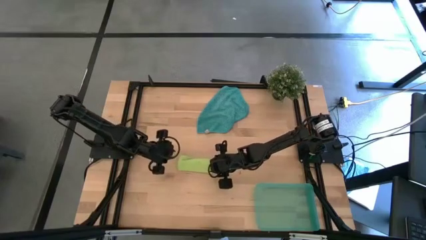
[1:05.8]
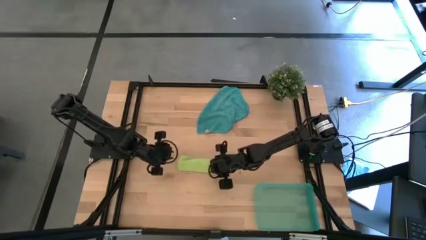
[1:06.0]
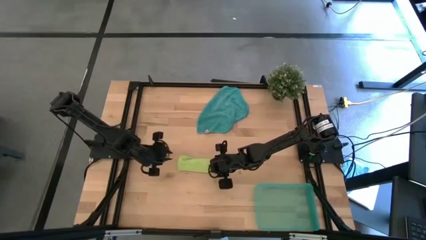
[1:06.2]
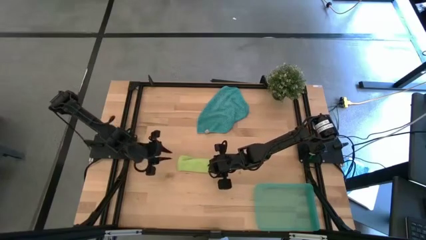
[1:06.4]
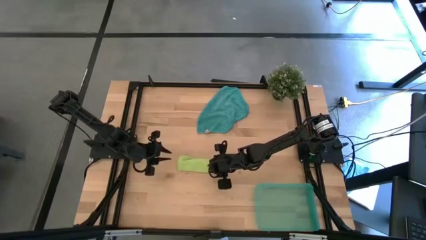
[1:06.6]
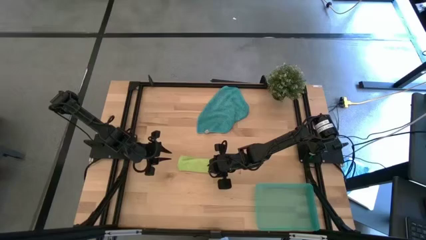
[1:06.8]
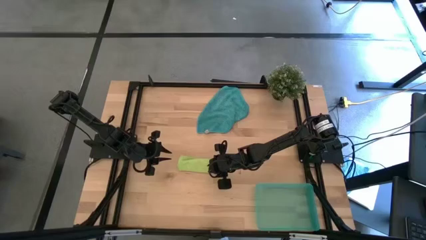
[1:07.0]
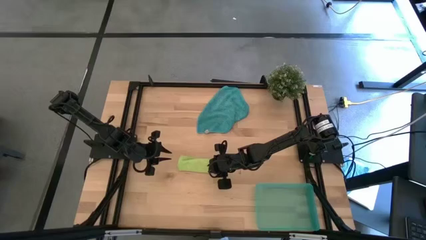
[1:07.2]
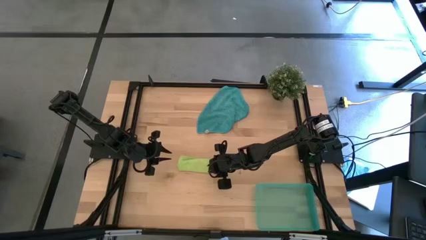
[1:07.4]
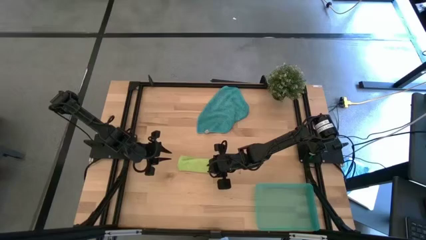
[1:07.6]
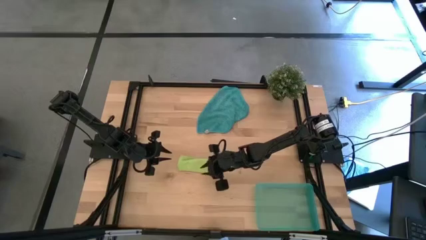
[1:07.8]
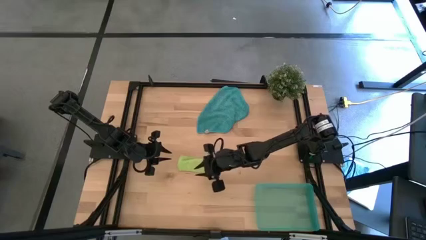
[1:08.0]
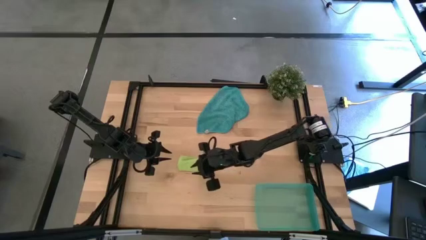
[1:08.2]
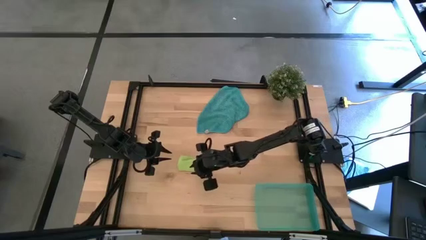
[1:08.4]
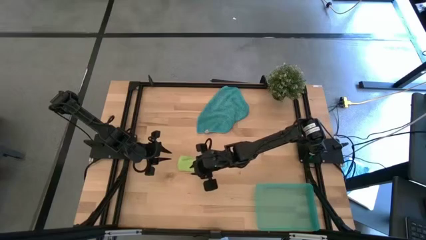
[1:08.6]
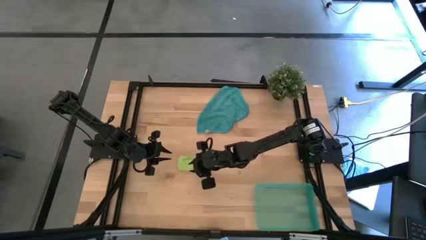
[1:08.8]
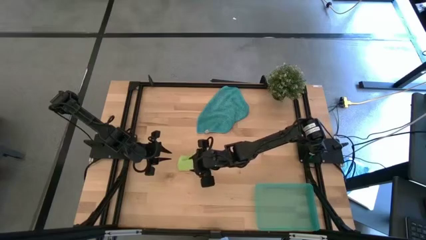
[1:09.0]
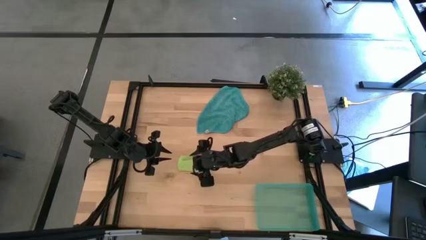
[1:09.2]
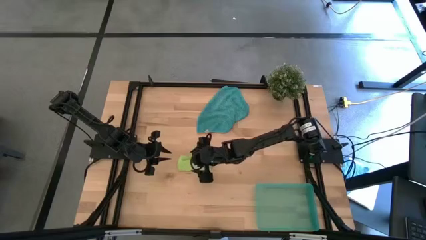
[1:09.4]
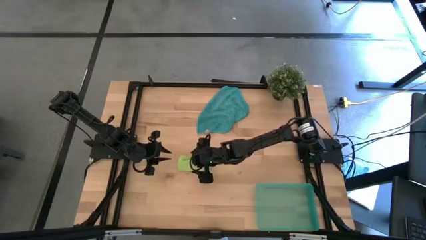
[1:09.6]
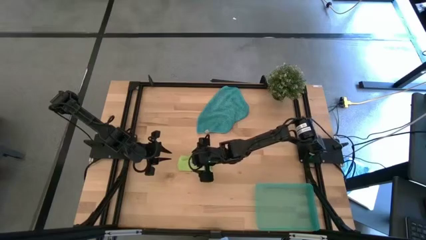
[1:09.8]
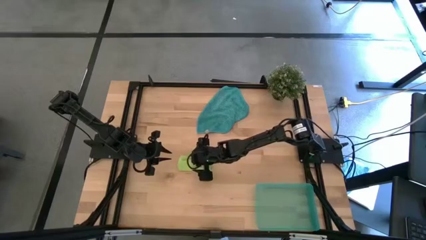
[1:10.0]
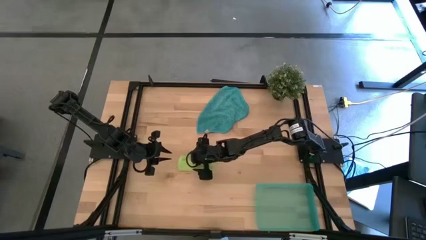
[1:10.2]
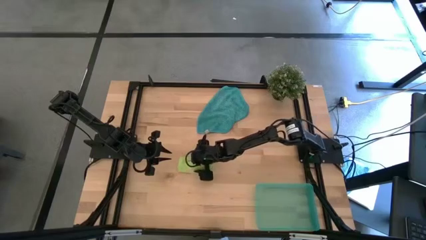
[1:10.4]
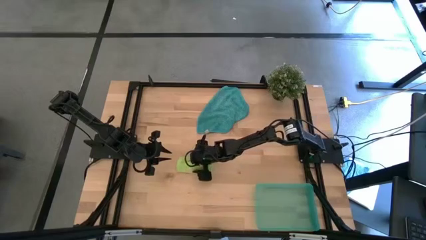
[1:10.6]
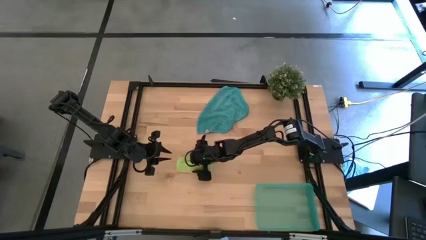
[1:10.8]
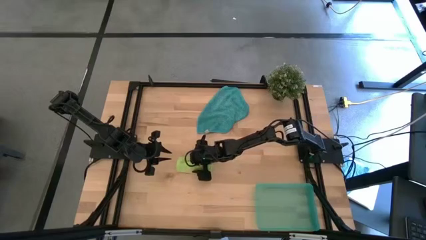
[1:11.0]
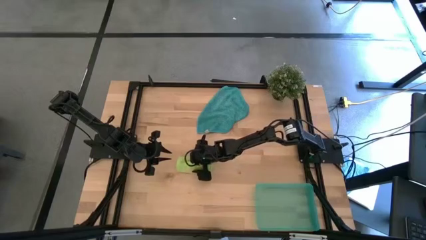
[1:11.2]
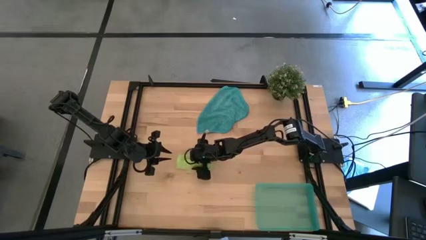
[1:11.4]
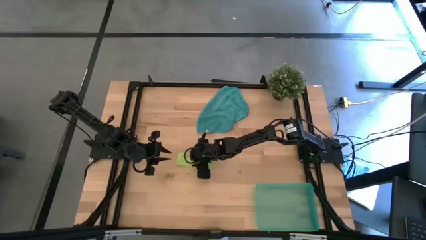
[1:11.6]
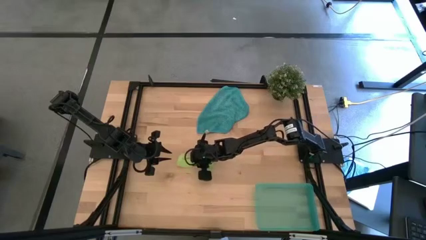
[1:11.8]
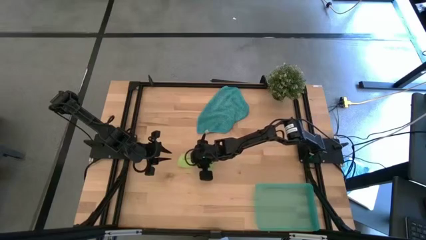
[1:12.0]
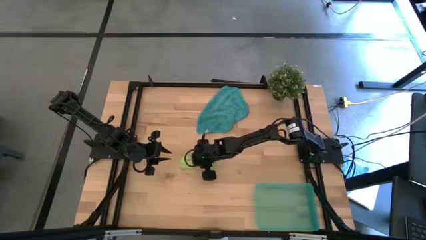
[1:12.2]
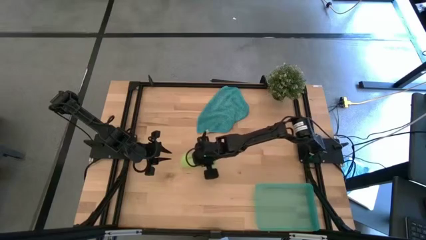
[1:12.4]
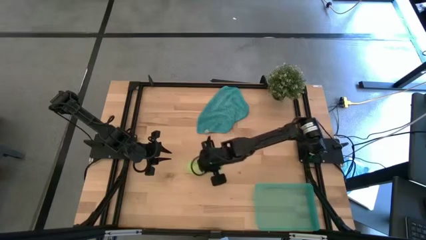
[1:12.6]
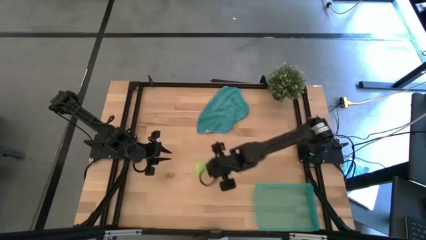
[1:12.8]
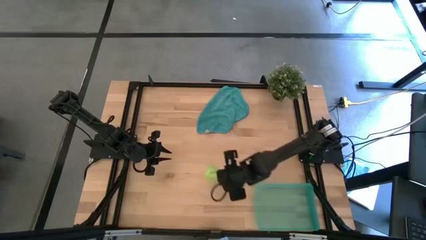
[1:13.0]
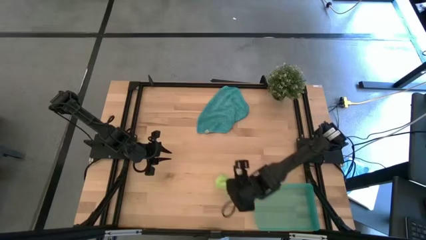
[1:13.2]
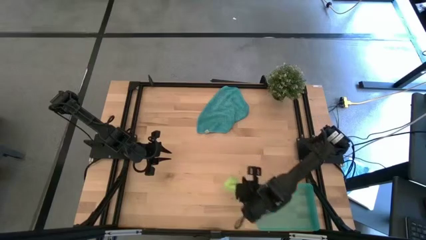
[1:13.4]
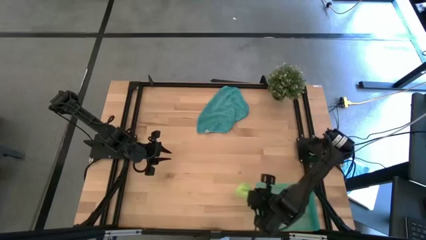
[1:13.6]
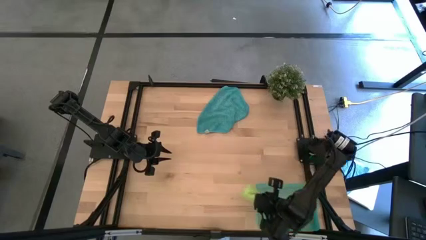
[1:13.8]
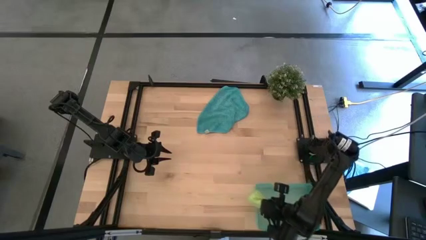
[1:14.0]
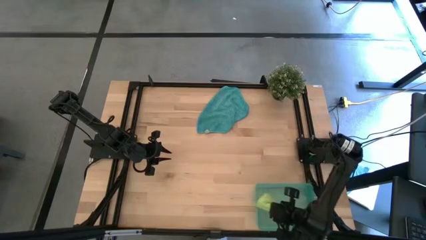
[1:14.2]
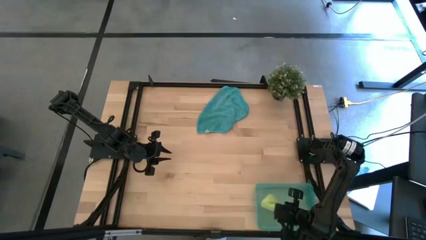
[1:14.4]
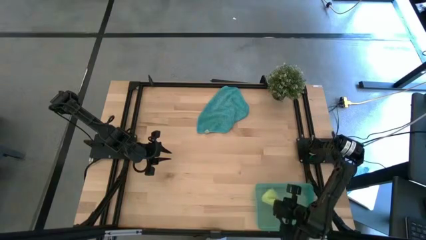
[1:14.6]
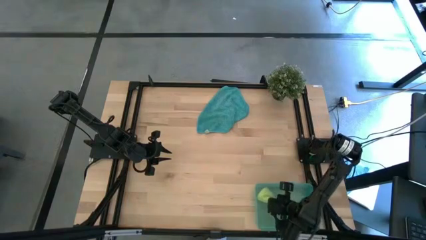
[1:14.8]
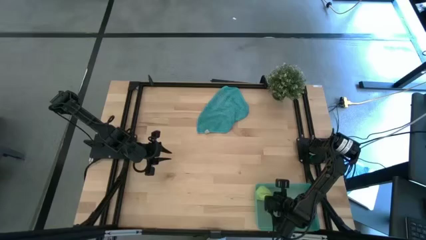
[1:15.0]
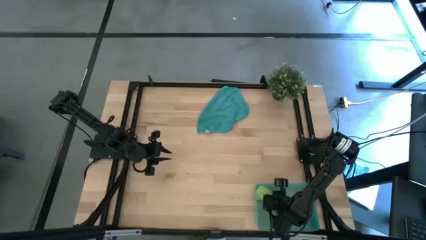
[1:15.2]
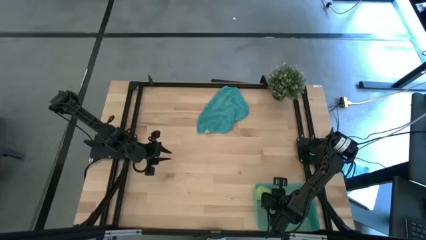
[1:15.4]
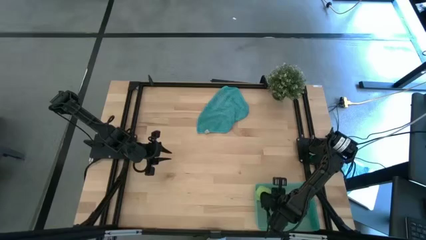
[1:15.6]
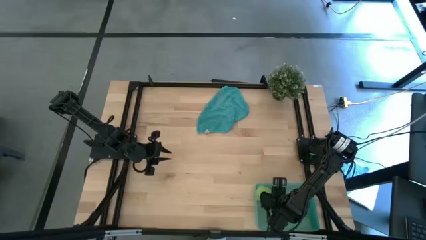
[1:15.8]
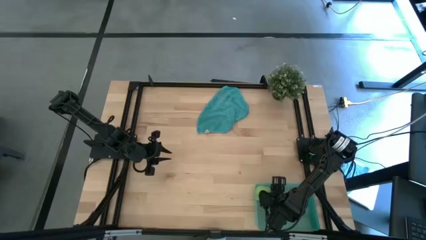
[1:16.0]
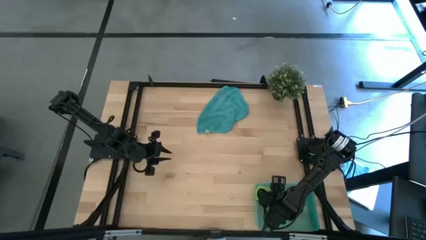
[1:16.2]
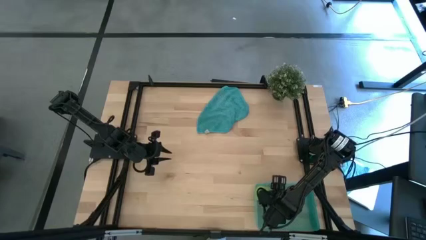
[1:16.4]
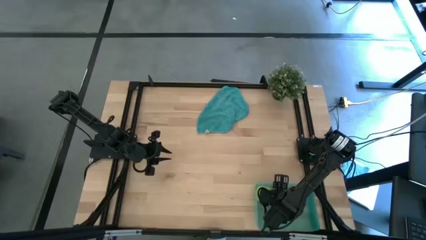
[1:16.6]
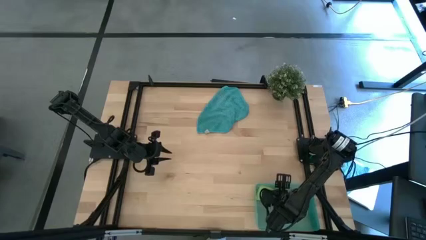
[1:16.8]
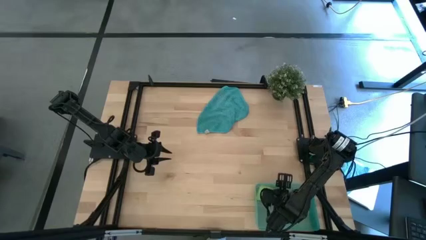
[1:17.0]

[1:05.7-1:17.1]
Task: Roll microfiber towels into tight, uniform cylinder then place into a basket
Put the green rolled microfiber cloth into the green bin
